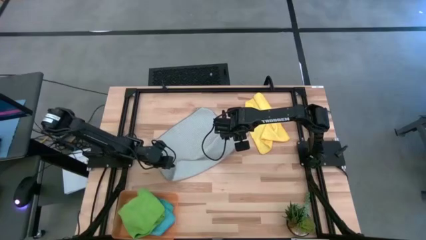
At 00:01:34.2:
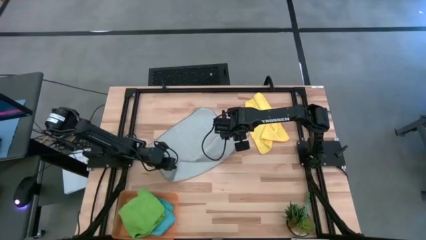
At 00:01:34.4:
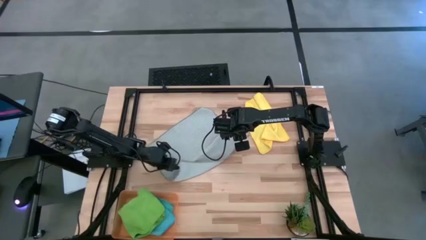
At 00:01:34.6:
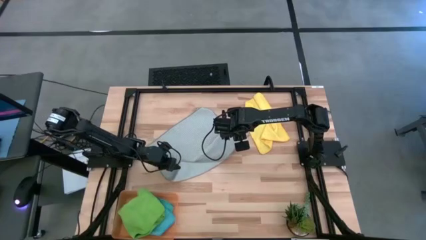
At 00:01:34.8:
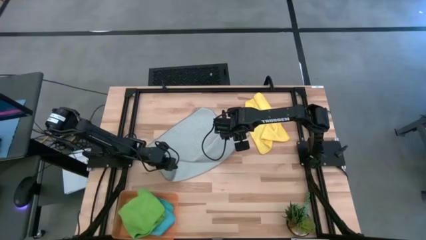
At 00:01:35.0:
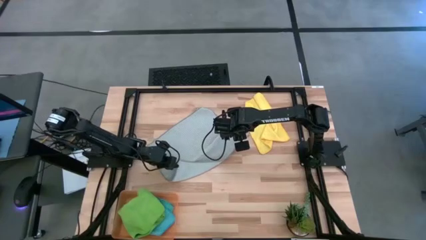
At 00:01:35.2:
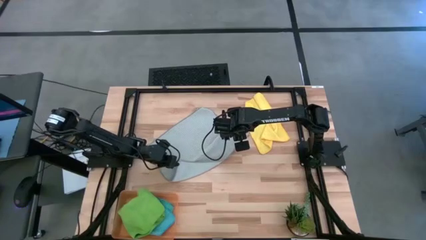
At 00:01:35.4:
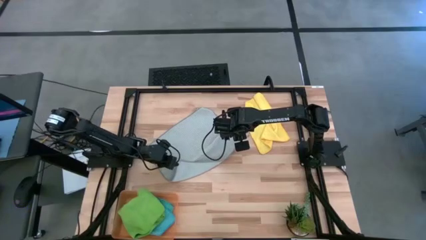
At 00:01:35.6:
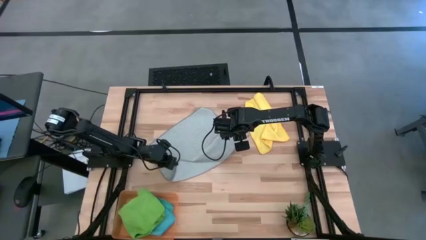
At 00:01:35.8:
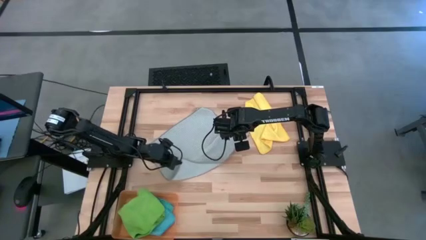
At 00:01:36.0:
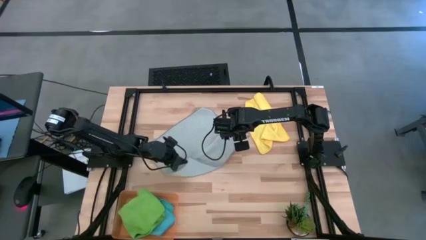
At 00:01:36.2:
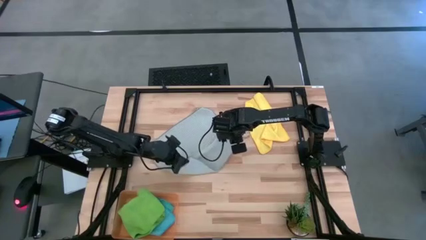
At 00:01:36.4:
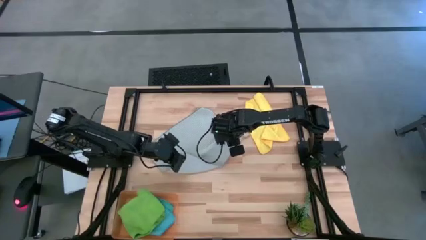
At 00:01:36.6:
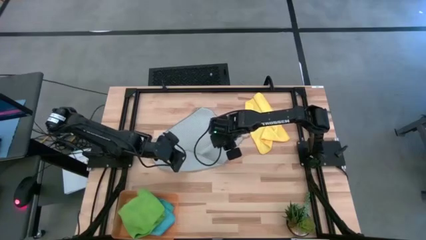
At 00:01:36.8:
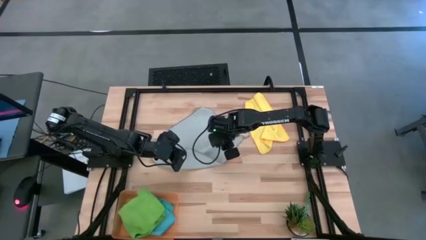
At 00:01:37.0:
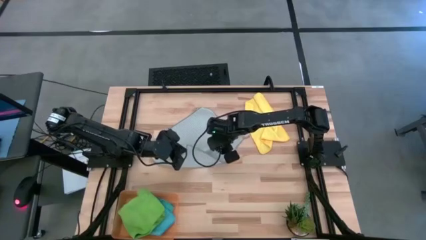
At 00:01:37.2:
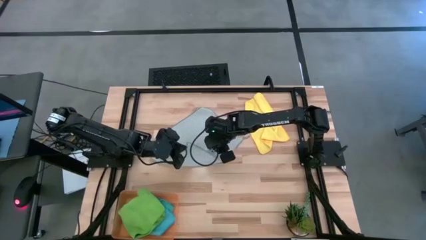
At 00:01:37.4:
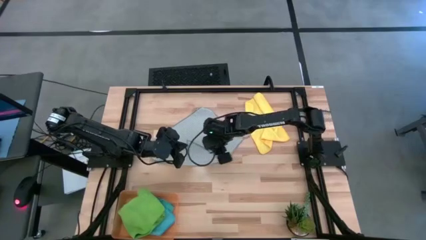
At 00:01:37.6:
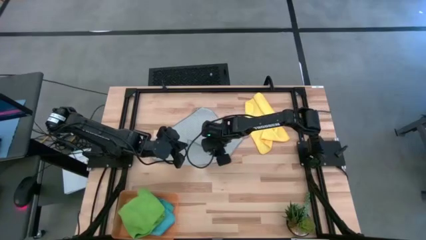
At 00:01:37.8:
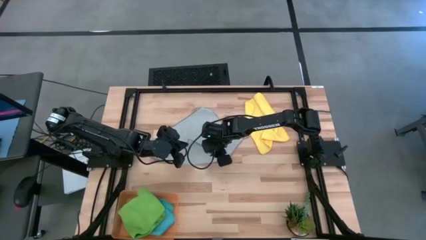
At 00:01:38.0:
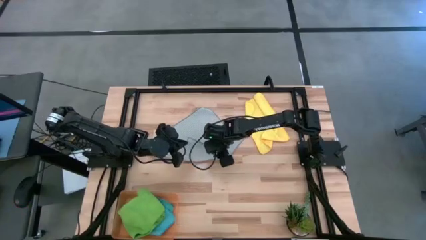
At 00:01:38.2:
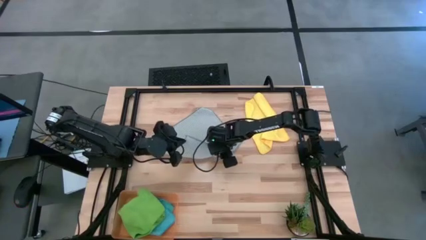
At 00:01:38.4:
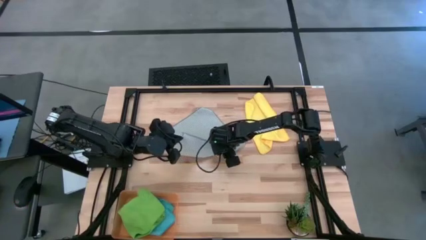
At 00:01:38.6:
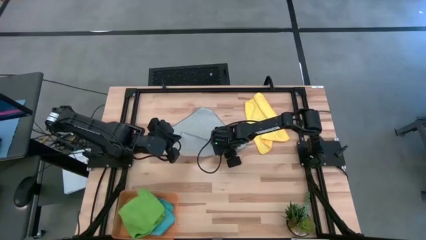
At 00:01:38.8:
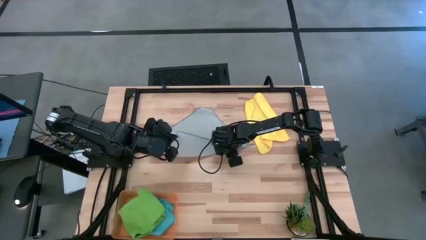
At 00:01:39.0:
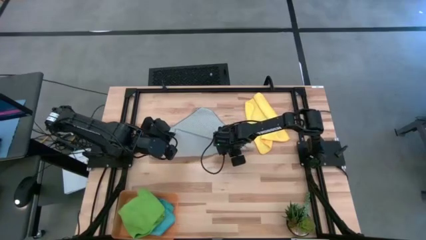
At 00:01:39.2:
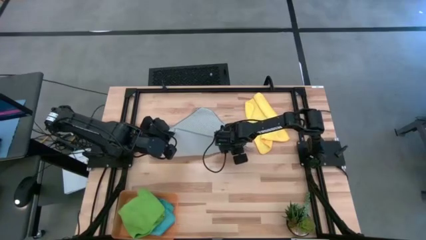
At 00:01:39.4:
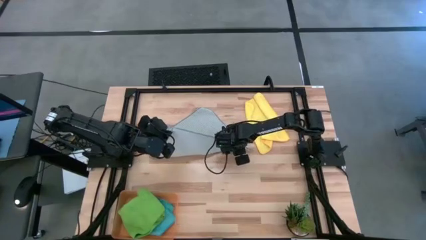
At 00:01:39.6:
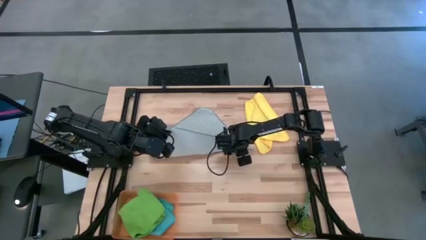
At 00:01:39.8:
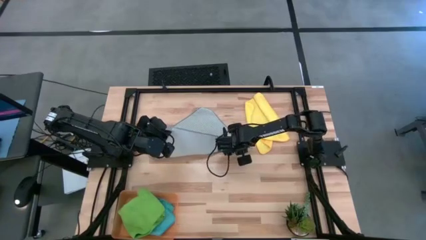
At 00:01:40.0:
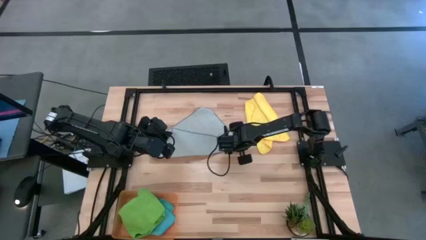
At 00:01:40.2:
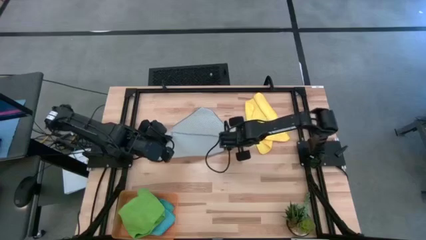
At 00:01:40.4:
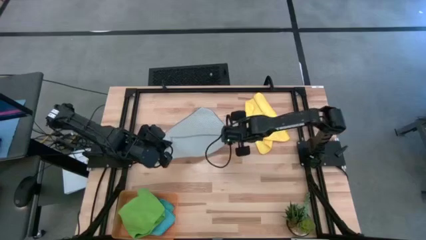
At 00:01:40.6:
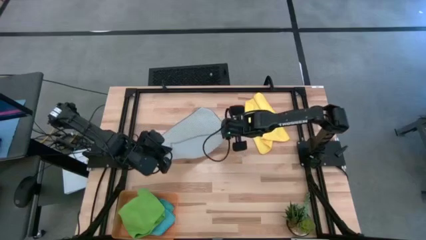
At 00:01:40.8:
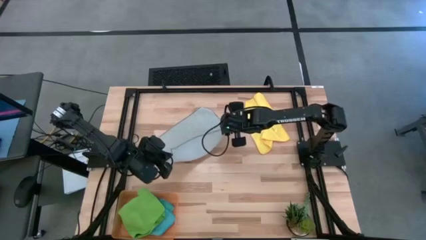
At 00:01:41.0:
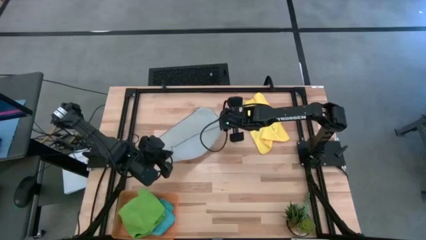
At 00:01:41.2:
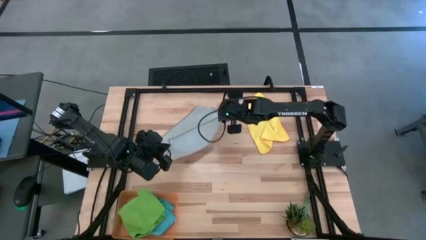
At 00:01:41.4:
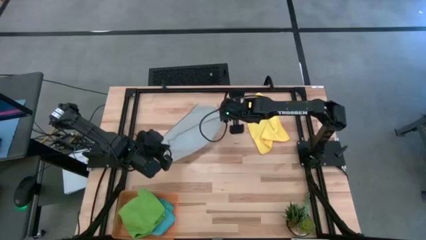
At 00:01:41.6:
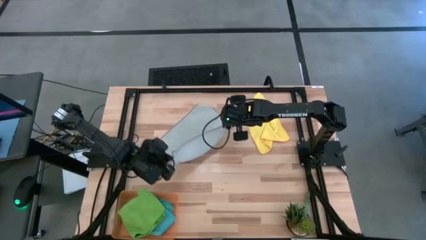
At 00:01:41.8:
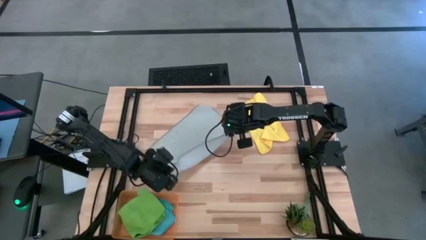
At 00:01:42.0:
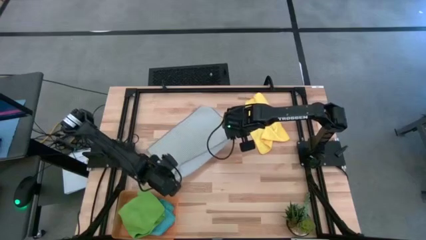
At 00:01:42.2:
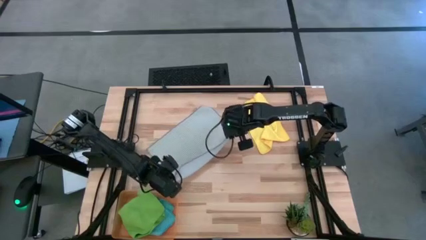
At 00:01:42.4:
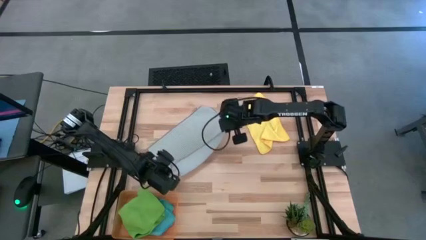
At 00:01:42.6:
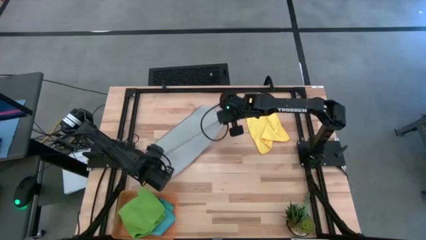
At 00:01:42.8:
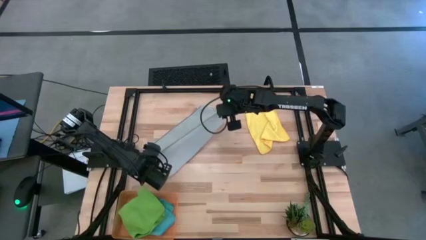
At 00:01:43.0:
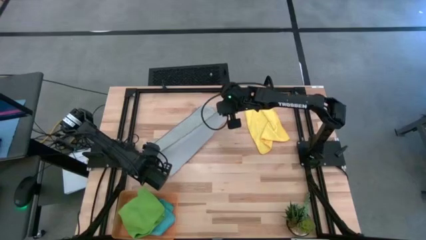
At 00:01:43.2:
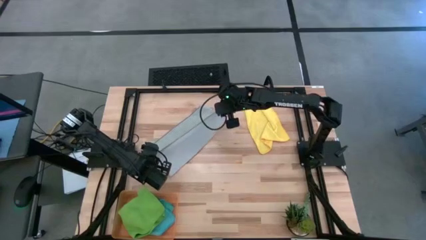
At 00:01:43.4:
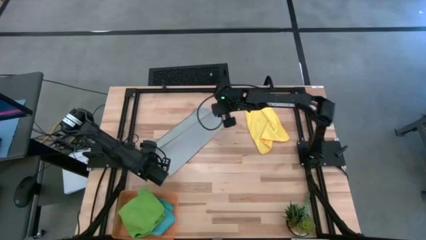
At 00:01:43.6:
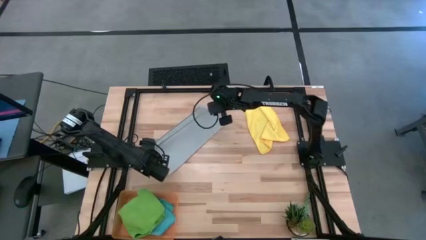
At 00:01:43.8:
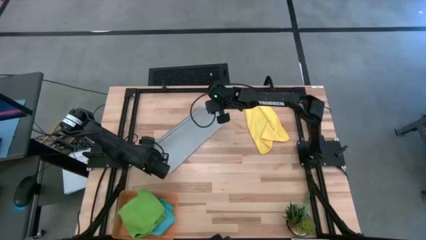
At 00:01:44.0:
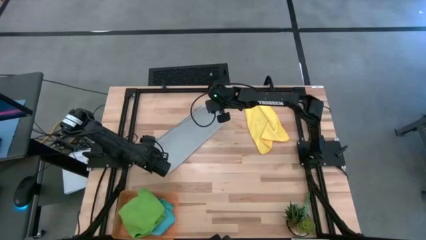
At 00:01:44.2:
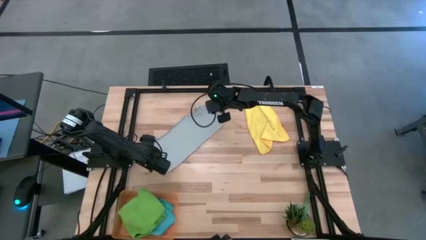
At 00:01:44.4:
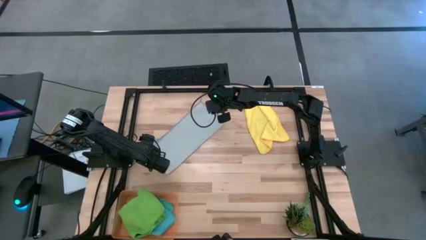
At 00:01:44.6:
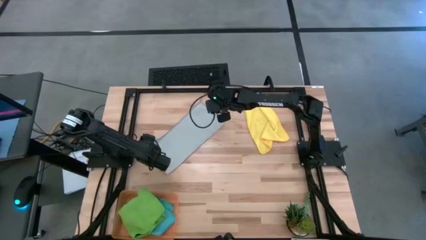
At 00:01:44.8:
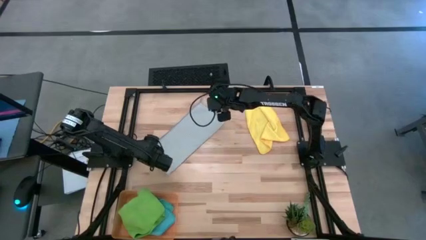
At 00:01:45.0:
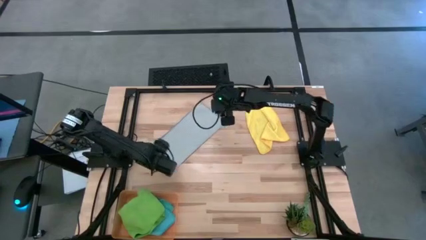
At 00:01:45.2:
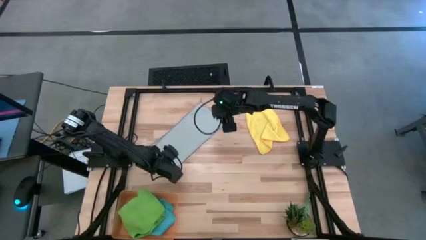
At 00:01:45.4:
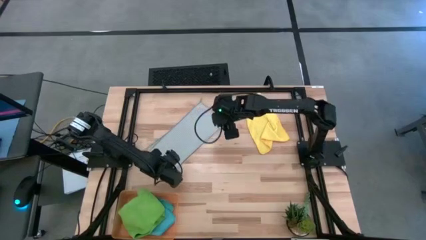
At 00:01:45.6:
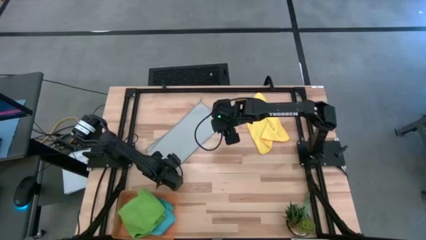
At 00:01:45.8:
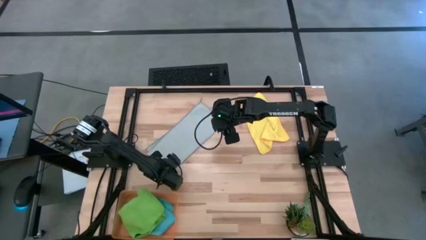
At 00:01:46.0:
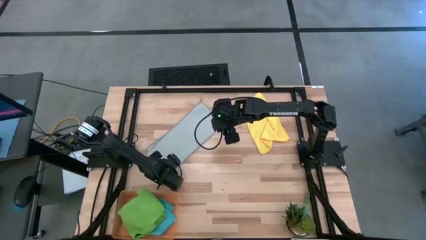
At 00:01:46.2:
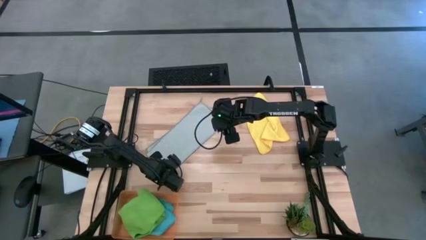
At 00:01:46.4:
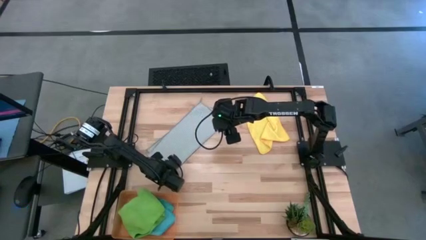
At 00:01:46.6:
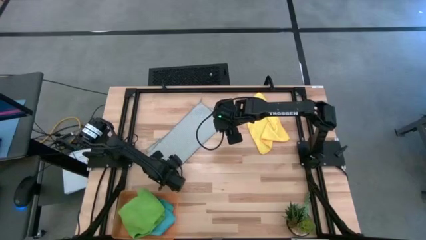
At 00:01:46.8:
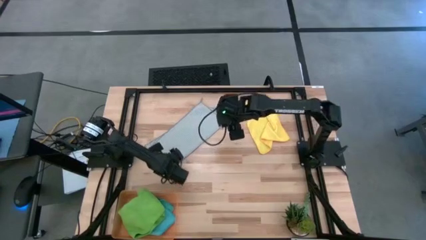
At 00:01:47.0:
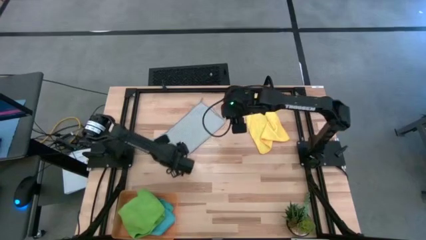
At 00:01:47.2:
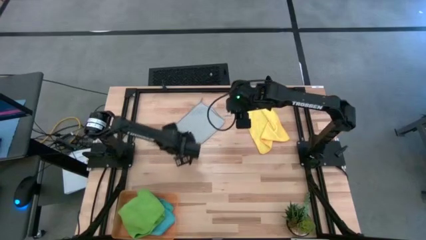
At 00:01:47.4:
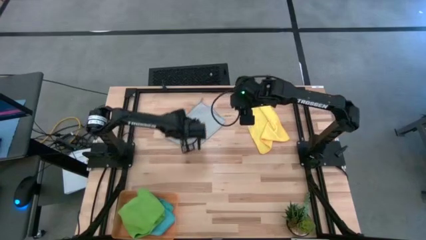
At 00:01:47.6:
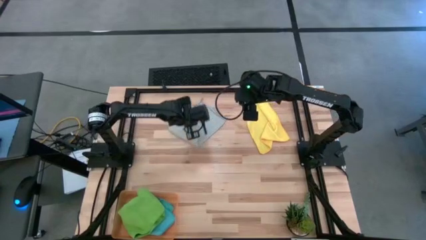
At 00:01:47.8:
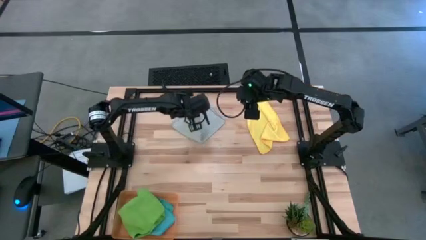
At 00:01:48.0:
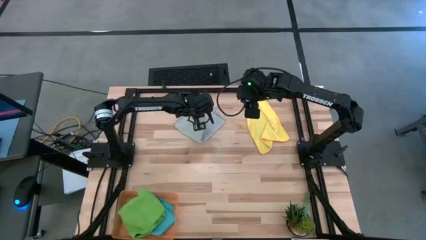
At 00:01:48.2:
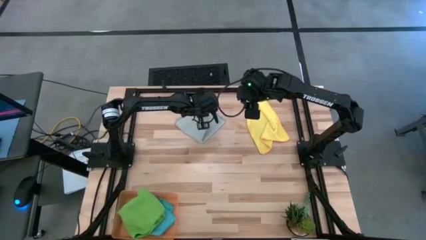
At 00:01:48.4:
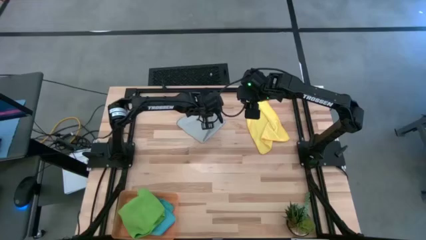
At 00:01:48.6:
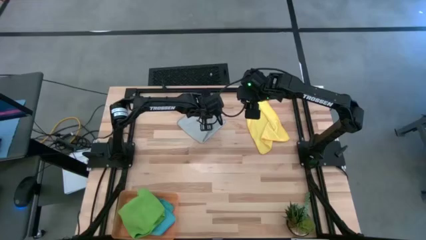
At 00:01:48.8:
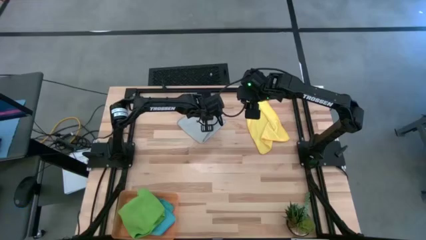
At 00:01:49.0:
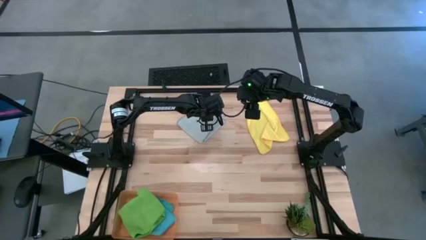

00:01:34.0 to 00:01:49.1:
Task: Fold microfiber towels
Fold the gray microfiber towel

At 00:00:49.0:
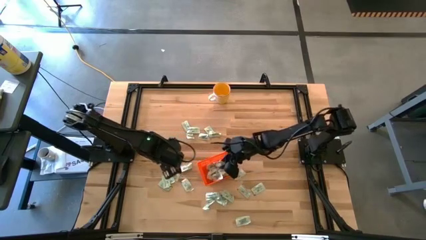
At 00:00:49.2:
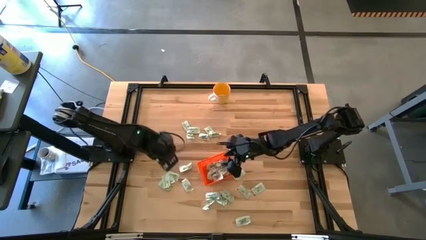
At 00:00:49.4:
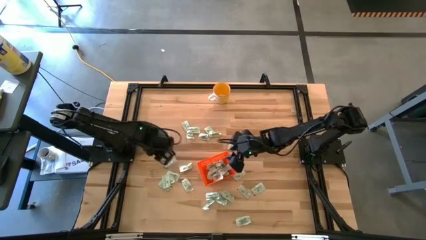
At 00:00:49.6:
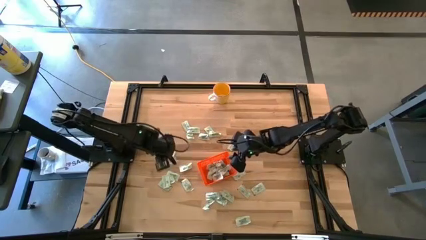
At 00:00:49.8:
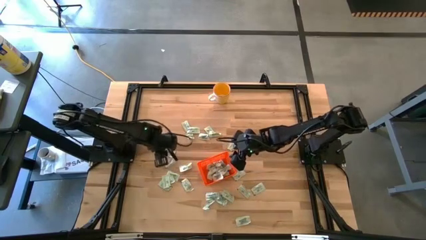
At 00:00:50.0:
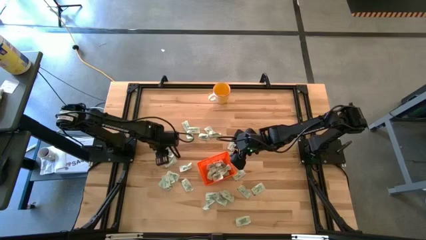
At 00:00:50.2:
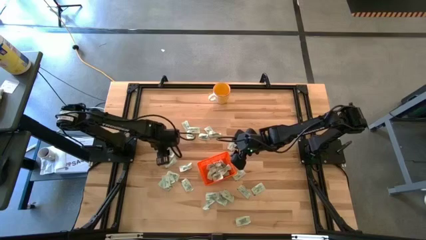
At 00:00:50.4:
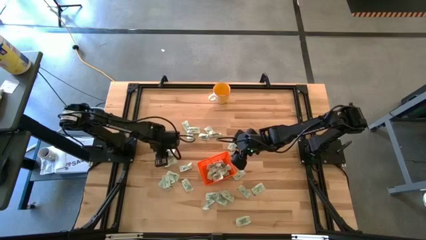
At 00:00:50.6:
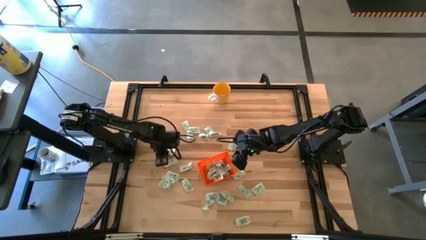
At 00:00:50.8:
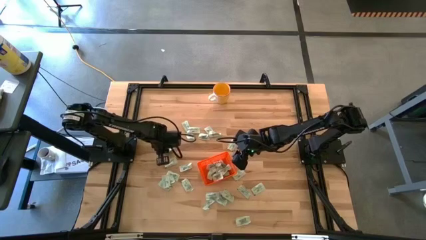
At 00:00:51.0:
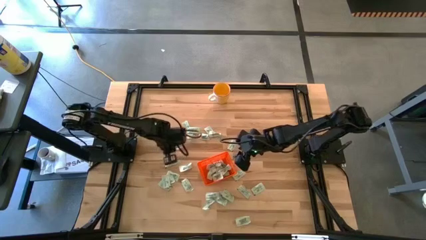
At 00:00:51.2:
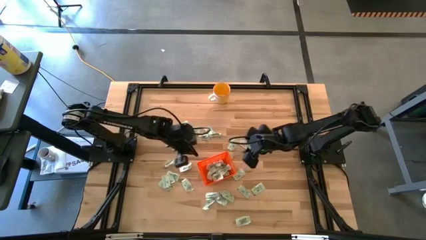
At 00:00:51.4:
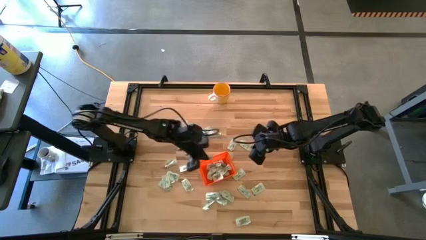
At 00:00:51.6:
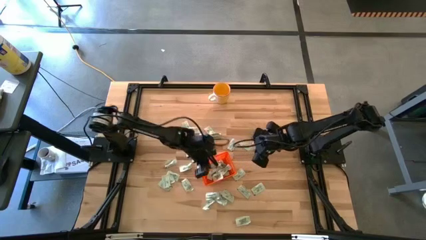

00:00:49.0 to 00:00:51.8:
Task: Pick and place Stevia / Truvia into bins
Put the stevia packet into the bin
